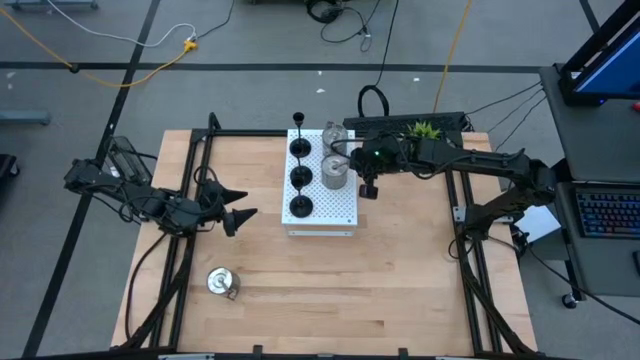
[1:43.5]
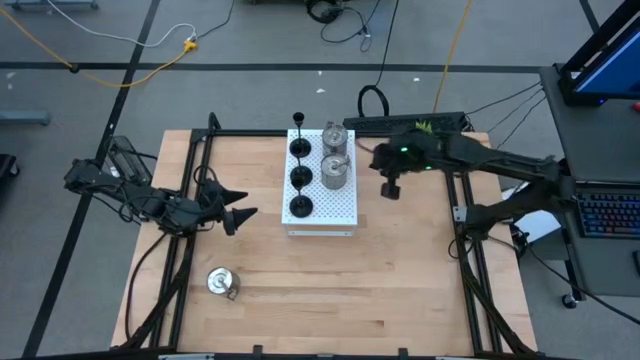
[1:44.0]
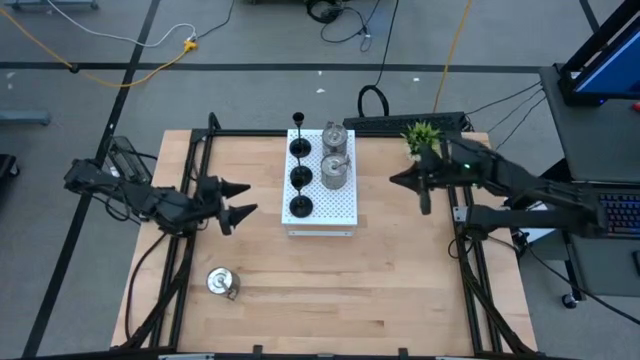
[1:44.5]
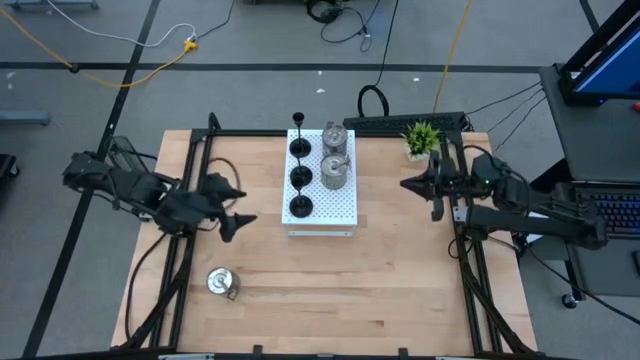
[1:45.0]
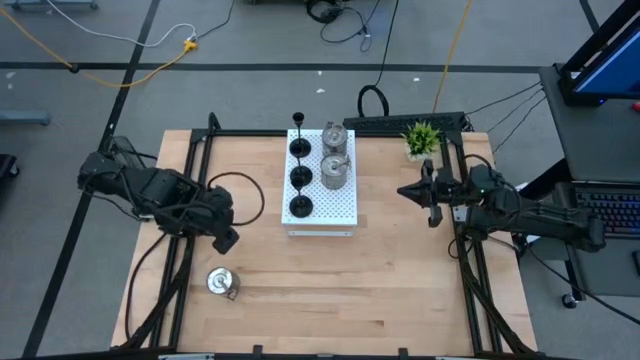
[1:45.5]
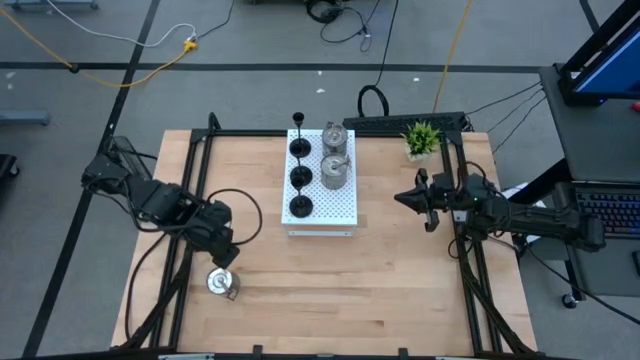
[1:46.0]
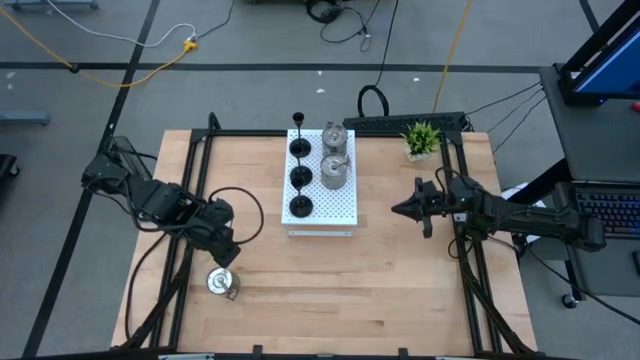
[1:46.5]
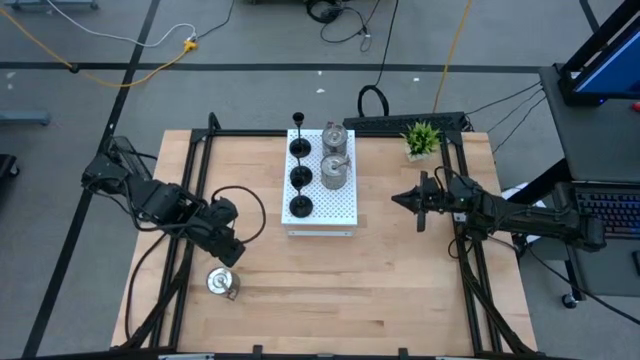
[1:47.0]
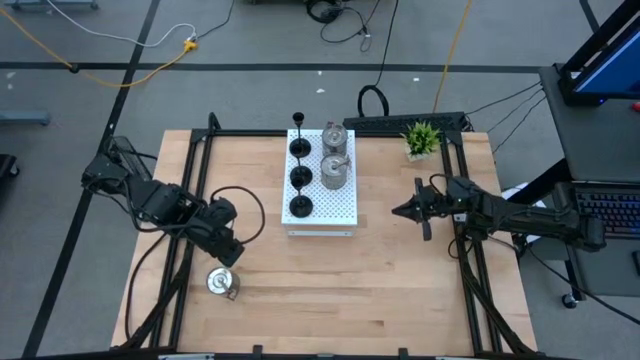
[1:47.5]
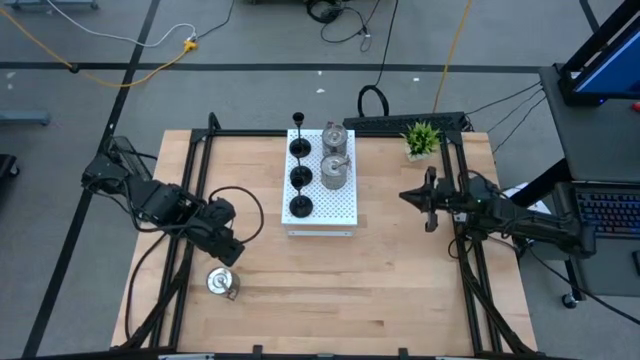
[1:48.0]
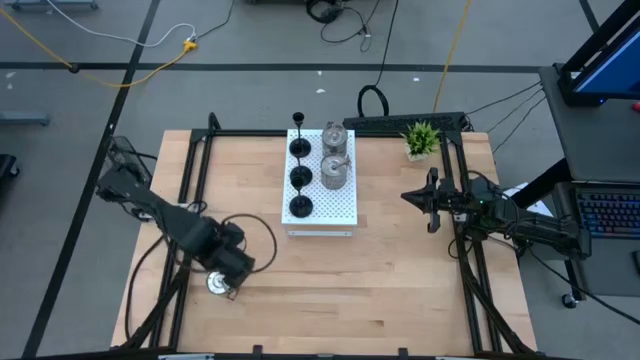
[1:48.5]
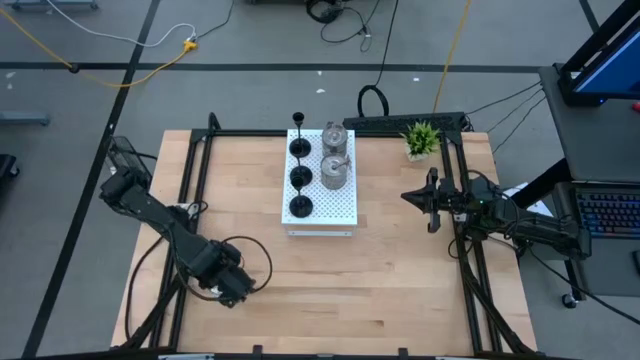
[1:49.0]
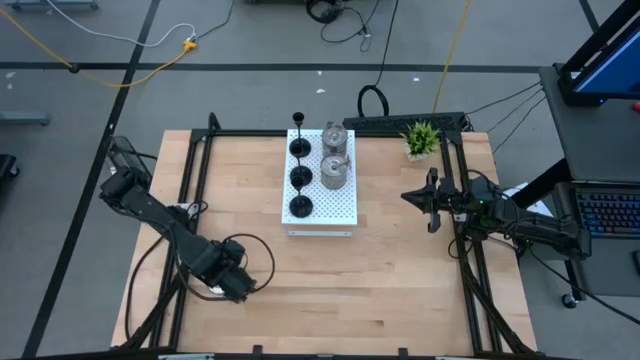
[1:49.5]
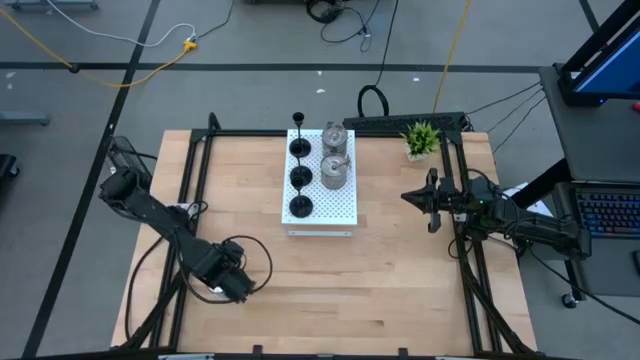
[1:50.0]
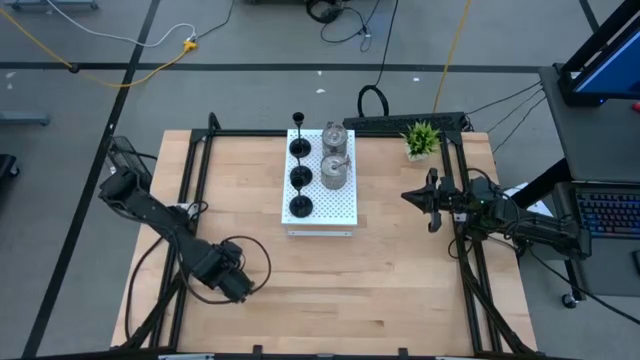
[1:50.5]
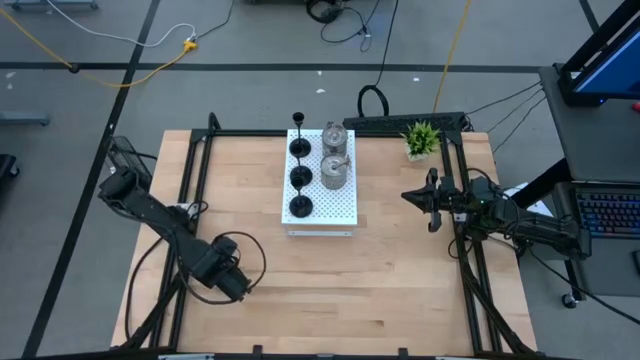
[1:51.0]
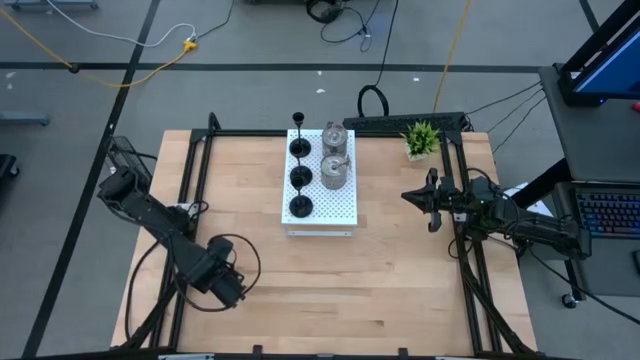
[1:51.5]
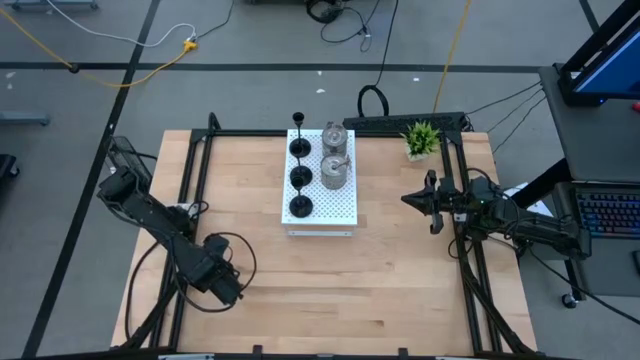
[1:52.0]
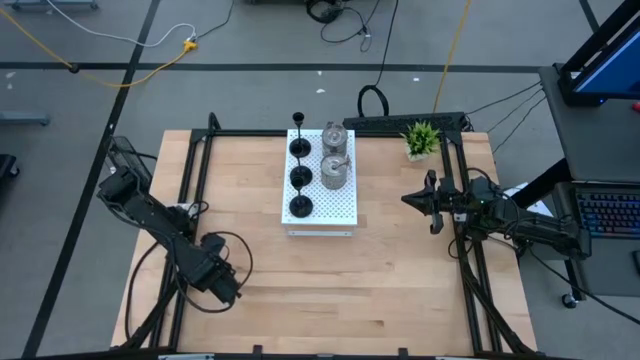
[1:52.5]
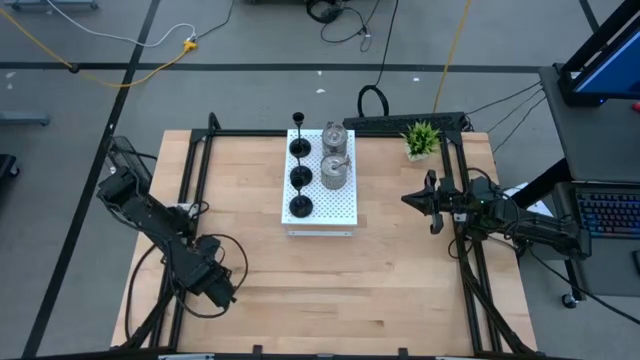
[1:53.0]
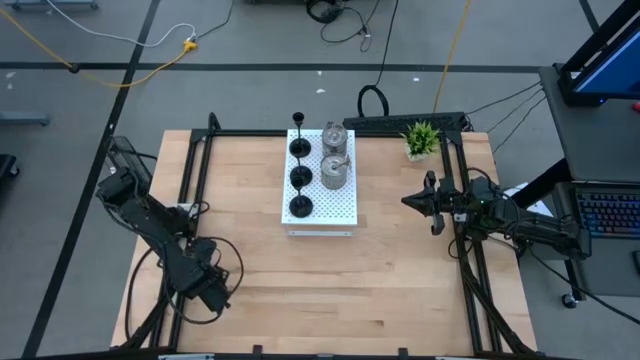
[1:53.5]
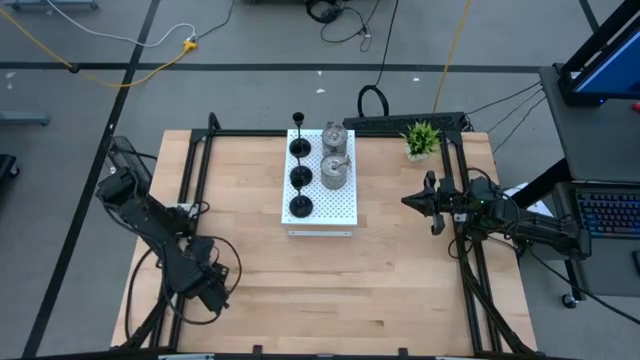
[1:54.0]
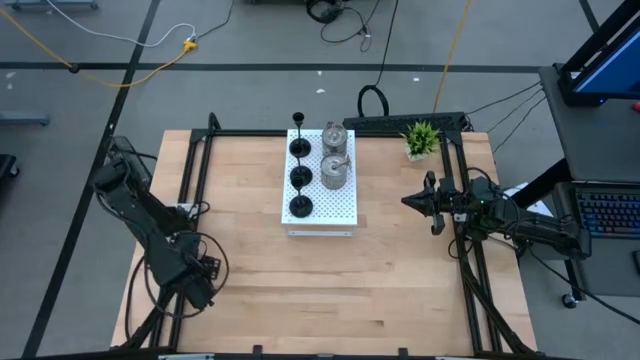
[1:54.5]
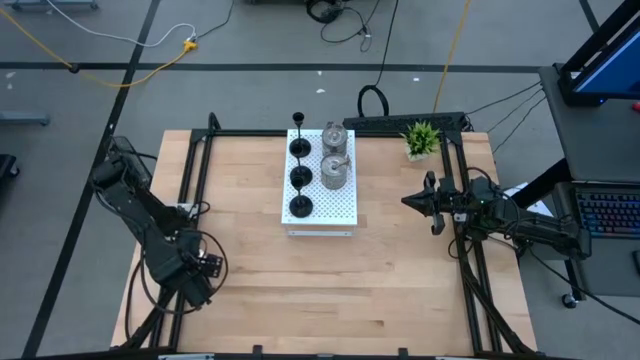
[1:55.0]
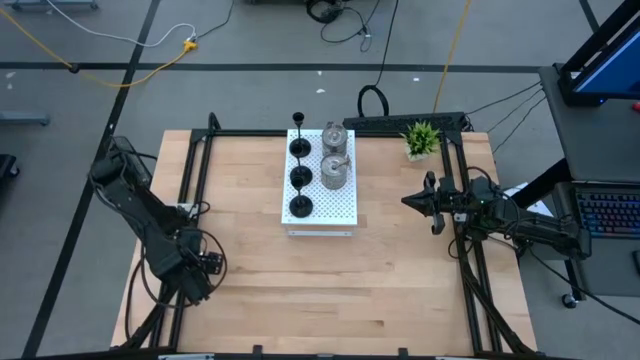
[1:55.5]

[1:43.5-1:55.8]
Task: Pick & Place candle stick holders
Put the silver scented candles on the shelf aligned with the other silver scented candles

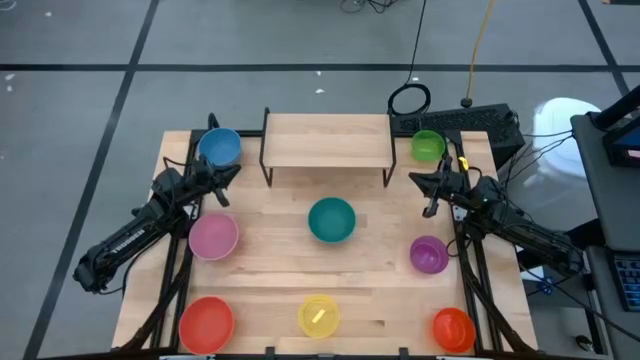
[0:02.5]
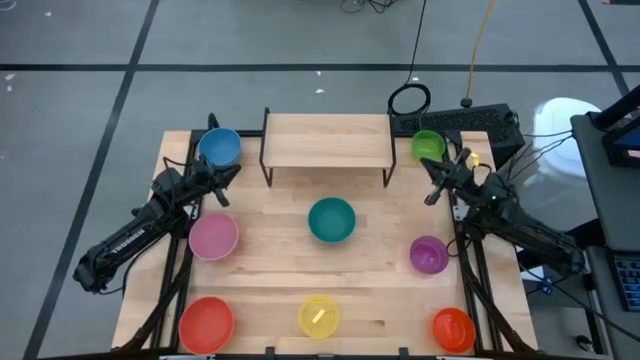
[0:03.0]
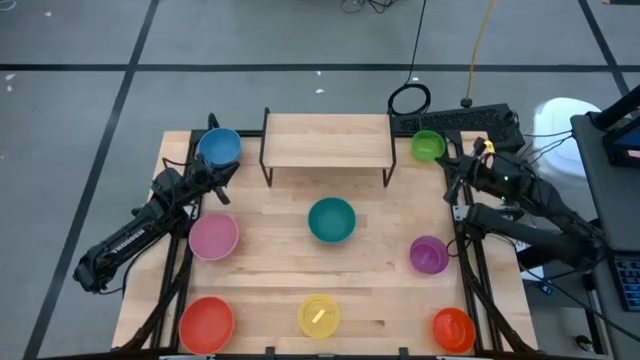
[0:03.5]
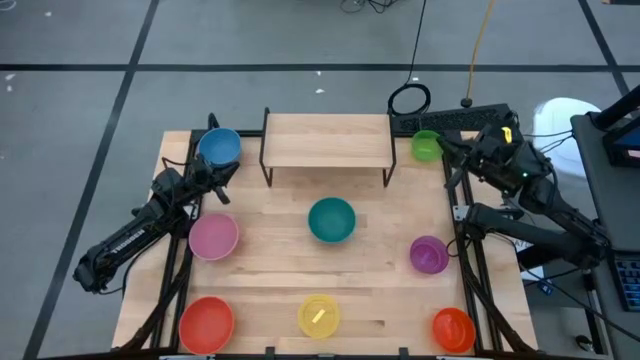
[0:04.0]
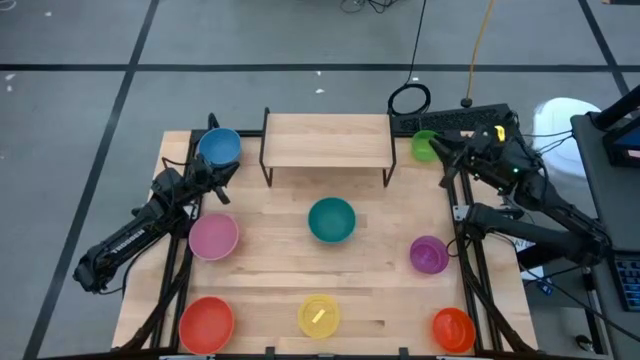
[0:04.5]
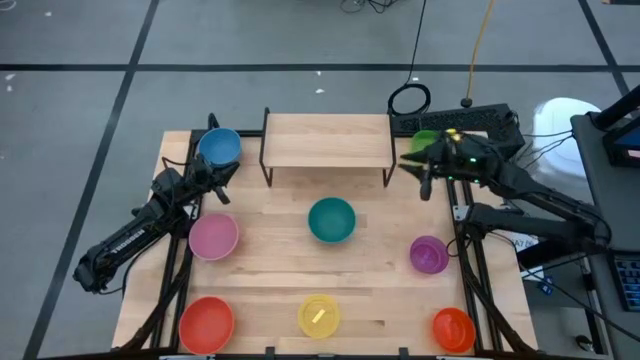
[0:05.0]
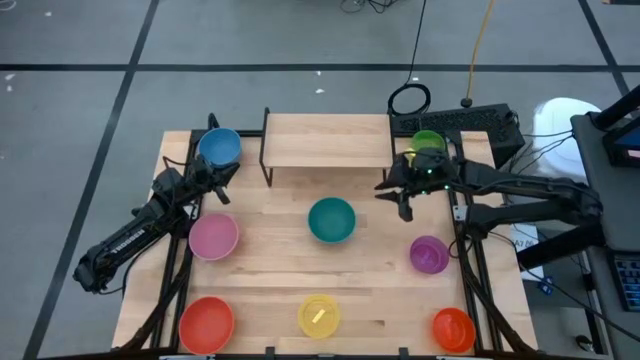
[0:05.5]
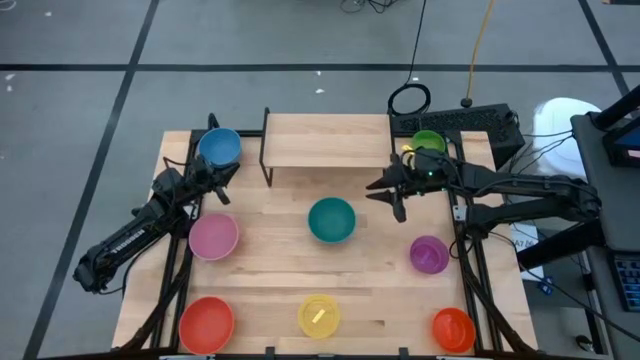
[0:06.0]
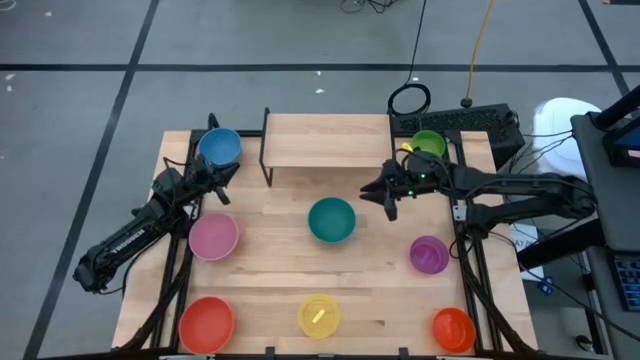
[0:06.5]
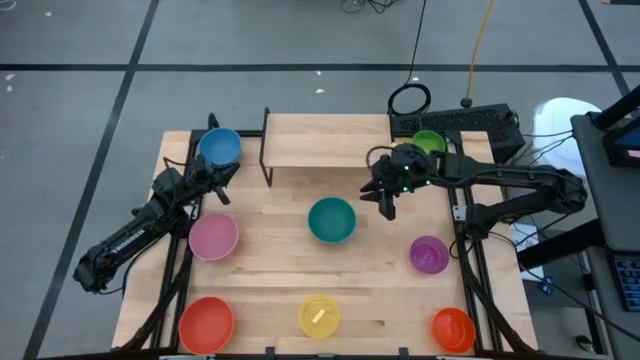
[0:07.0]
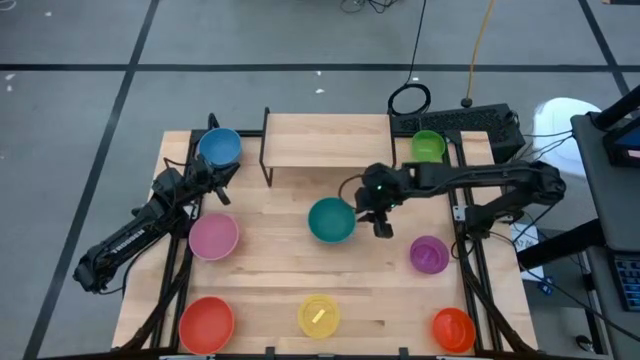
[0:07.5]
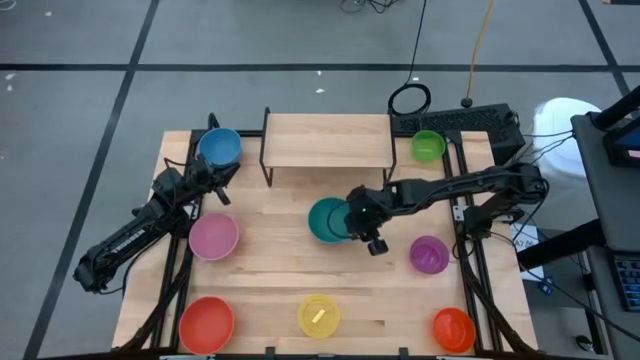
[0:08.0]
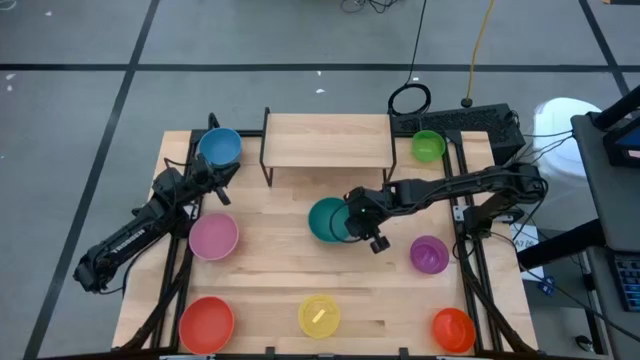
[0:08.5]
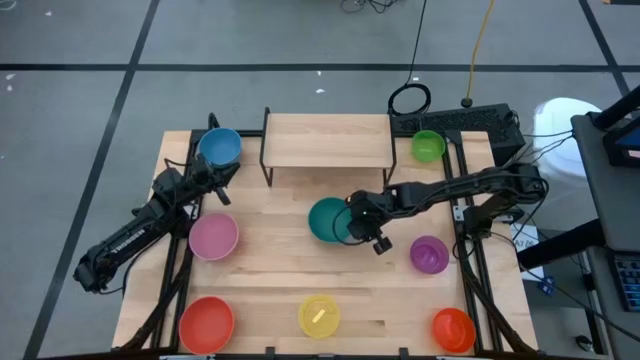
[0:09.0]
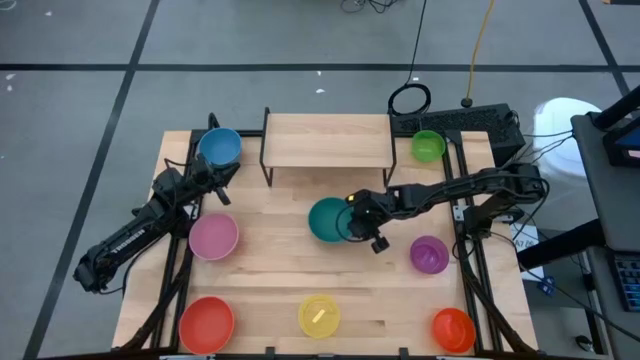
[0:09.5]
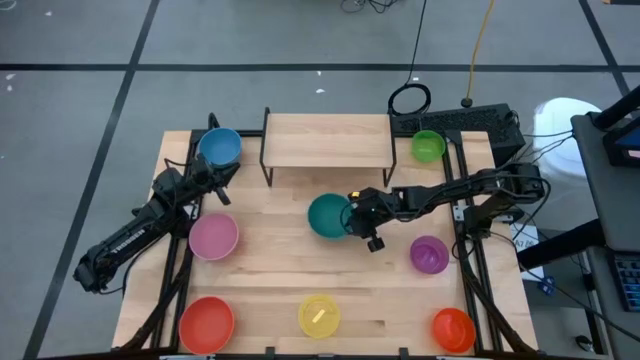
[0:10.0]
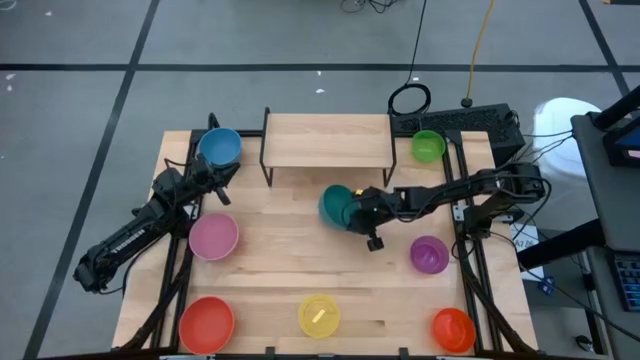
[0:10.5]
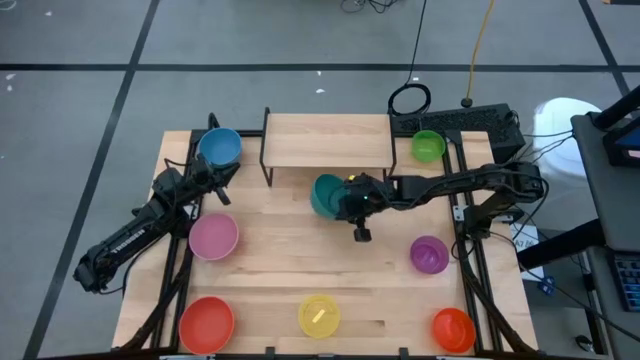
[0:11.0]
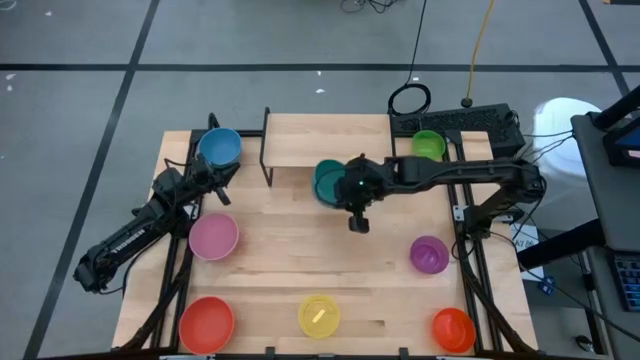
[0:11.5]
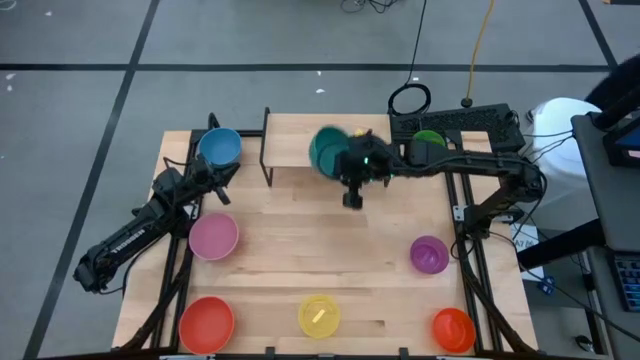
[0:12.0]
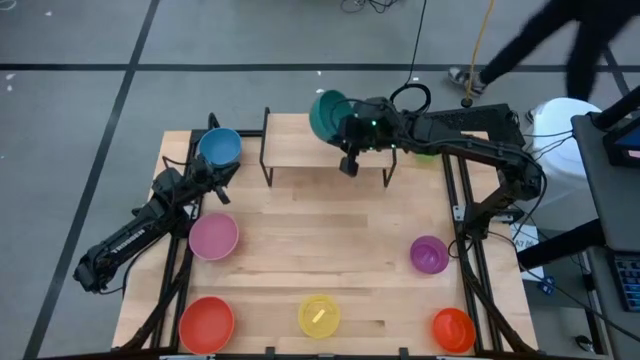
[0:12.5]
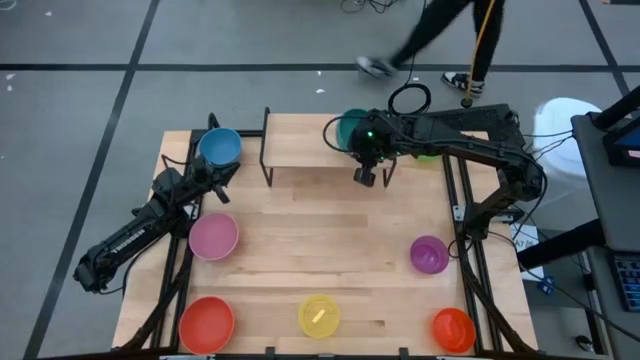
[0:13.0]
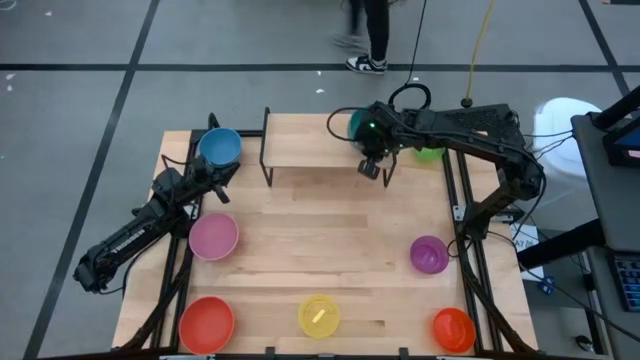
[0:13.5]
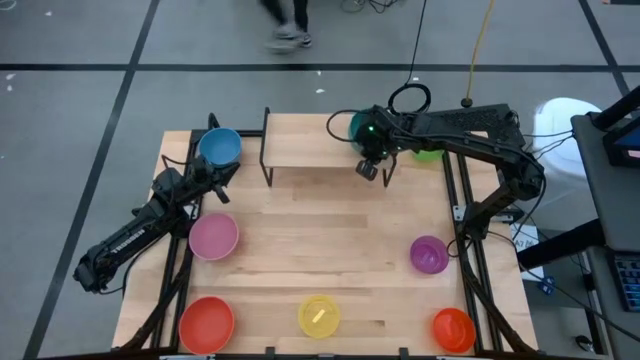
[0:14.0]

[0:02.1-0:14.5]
Task: Place and stack bowls onto a shelf
Put the dark green bowl on the shelf
